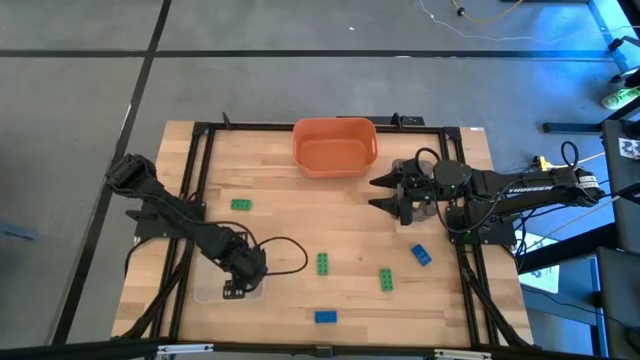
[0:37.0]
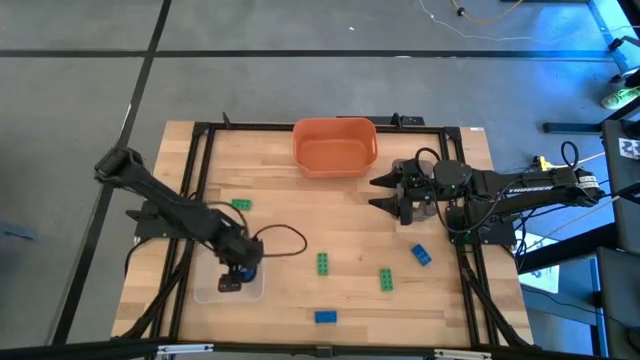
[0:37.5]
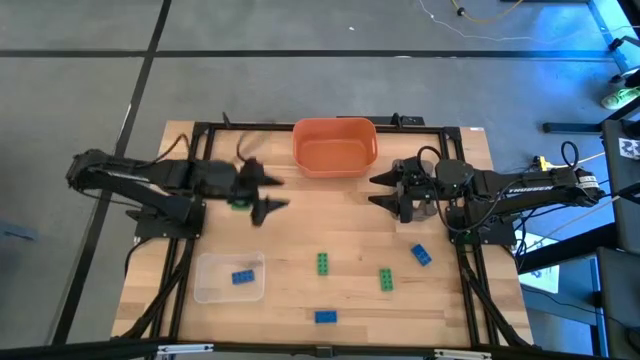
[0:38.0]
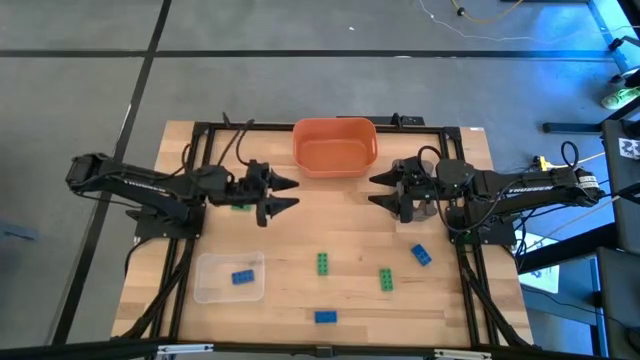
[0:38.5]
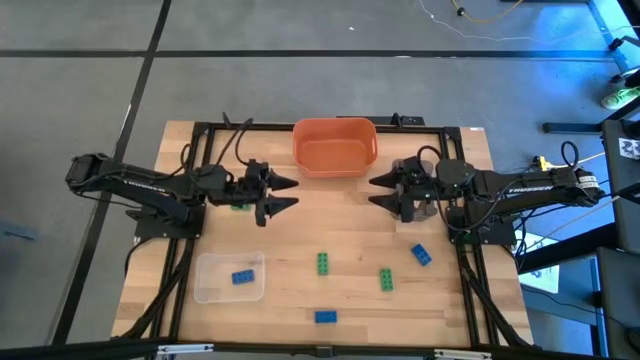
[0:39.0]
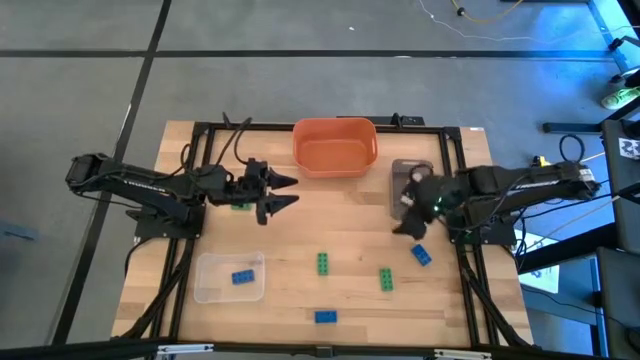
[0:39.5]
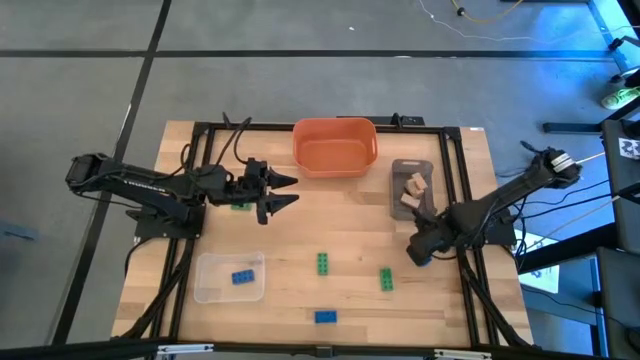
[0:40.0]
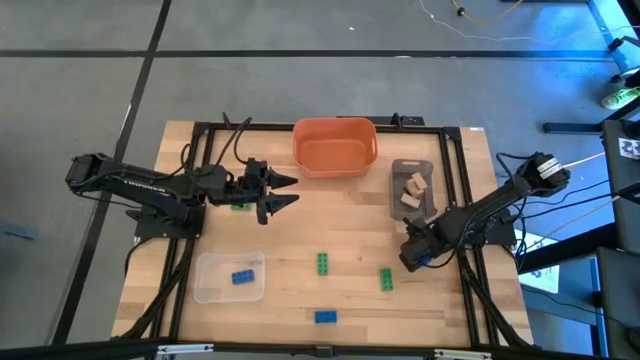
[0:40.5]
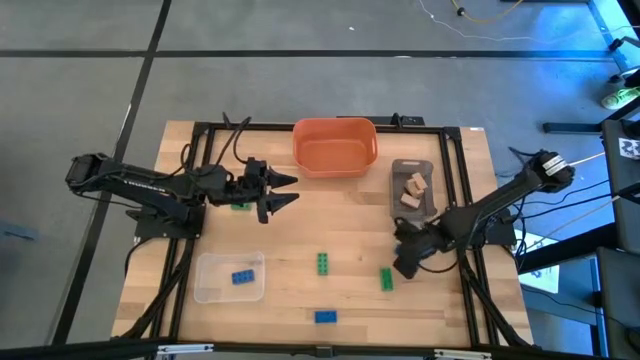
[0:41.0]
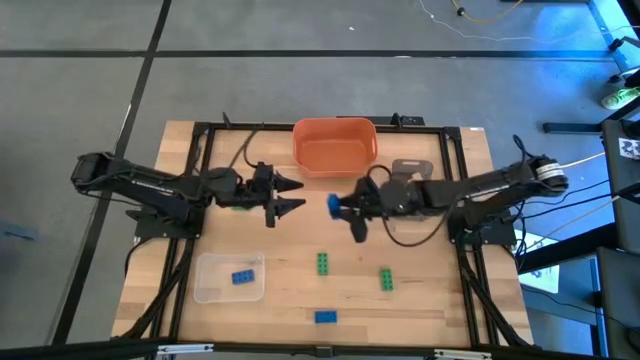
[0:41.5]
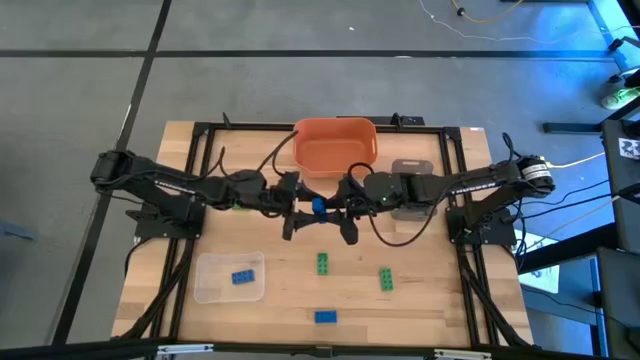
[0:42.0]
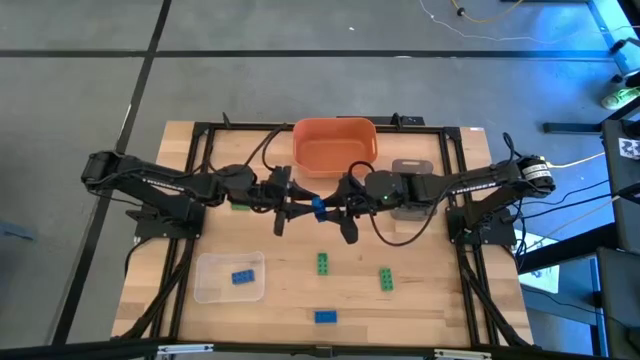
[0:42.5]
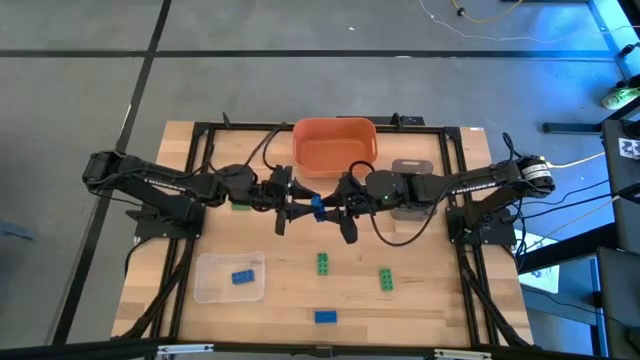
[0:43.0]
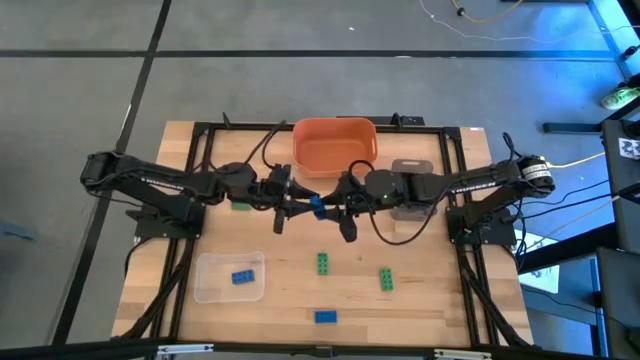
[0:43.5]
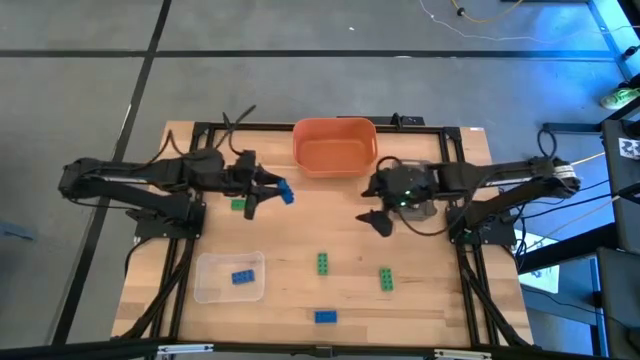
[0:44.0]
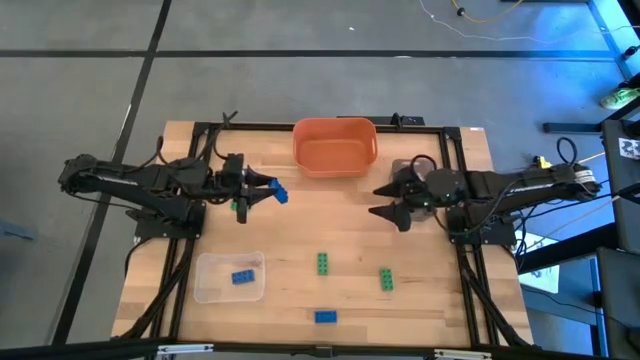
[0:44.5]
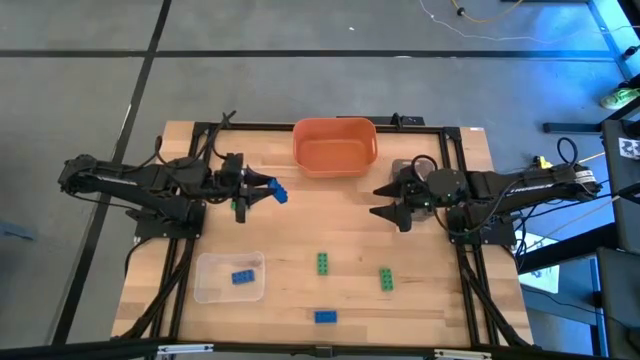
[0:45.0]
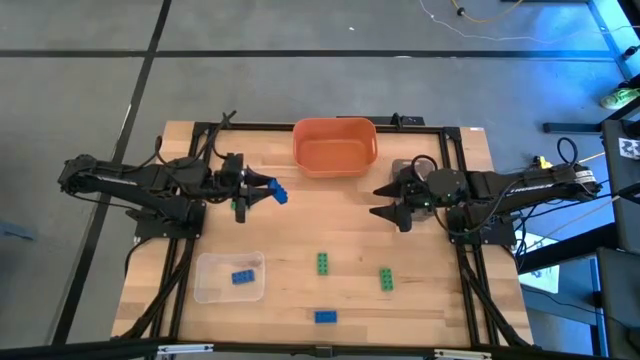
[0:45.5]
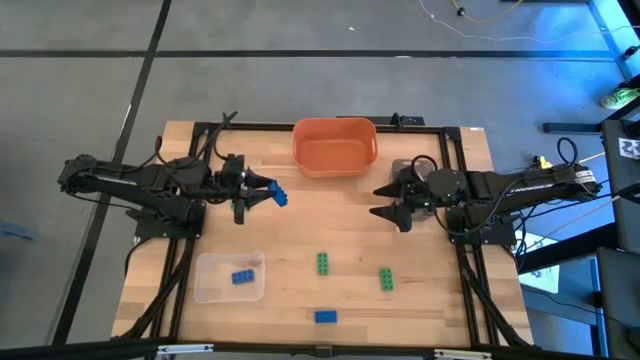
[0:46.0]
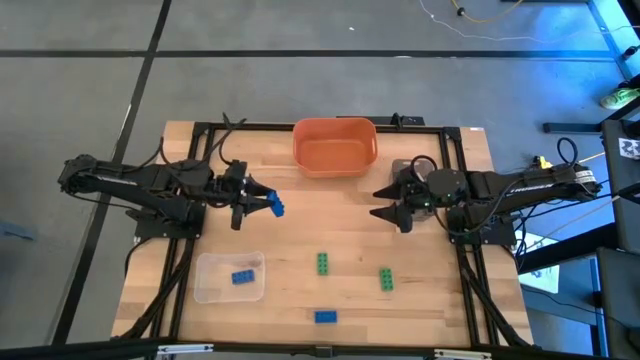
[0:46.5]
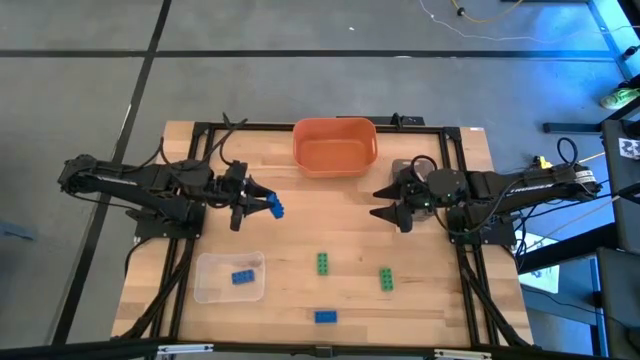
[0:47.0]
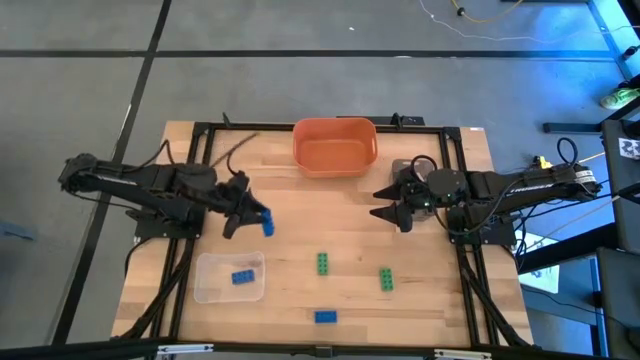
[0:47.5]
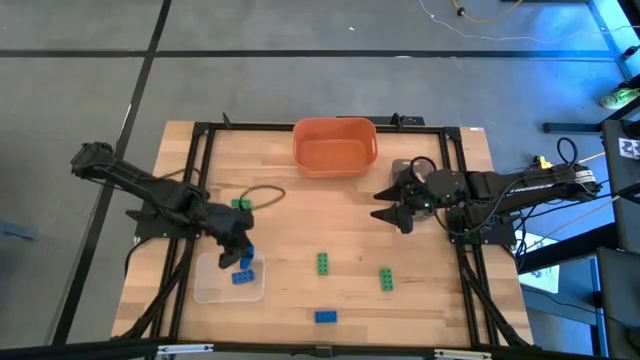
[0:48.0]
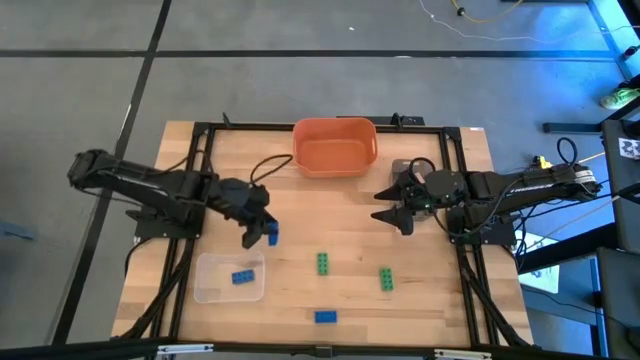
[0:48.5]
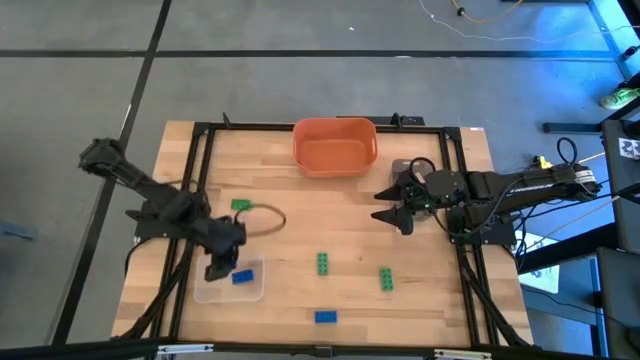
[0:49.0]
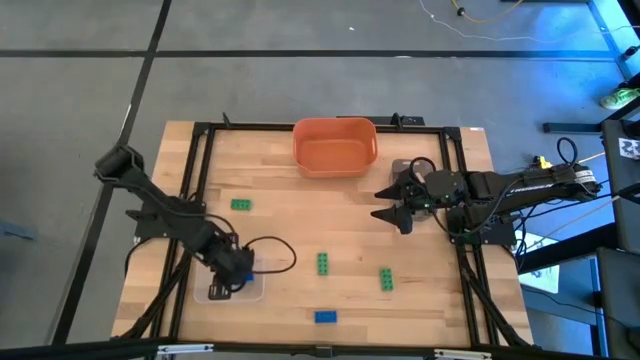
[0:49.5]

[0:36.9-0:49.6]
Task: Sort & place blocks by color
Put the blue 8 stud game piece block into the transparent bin

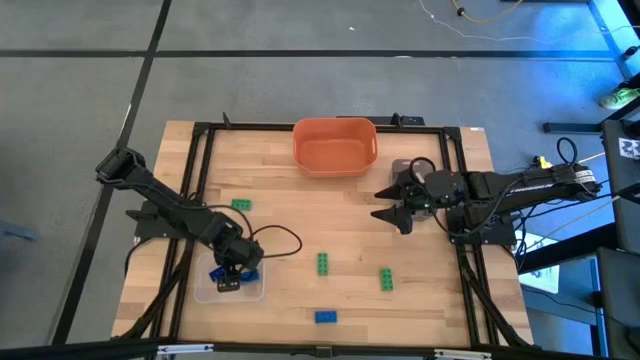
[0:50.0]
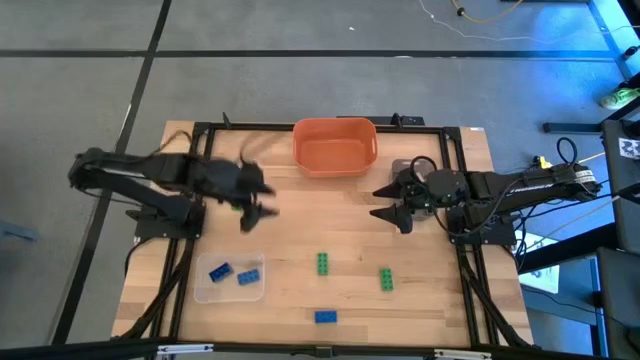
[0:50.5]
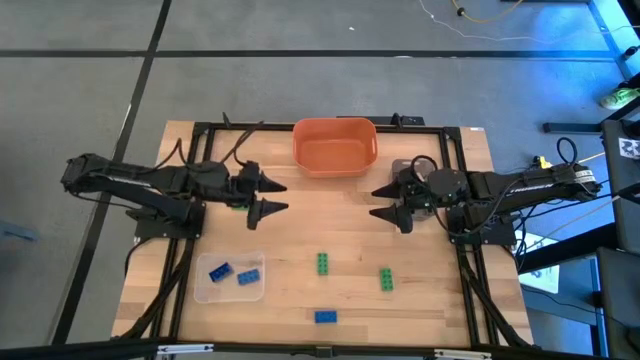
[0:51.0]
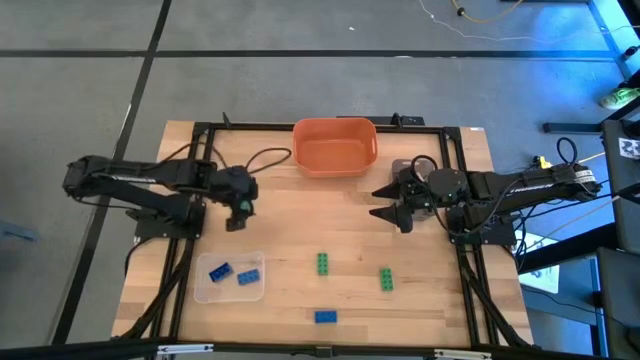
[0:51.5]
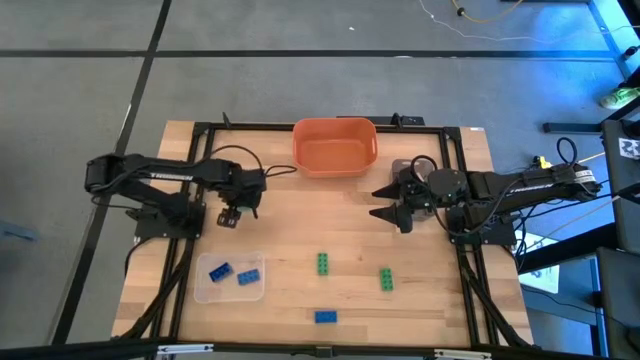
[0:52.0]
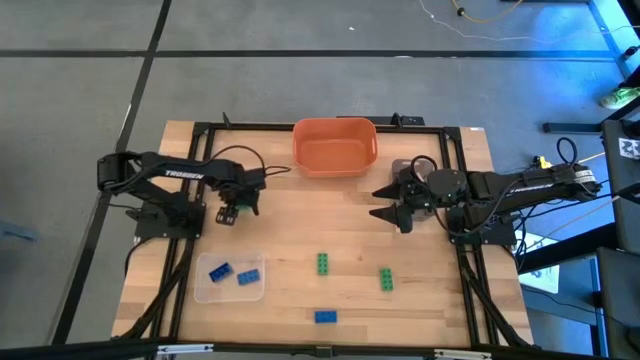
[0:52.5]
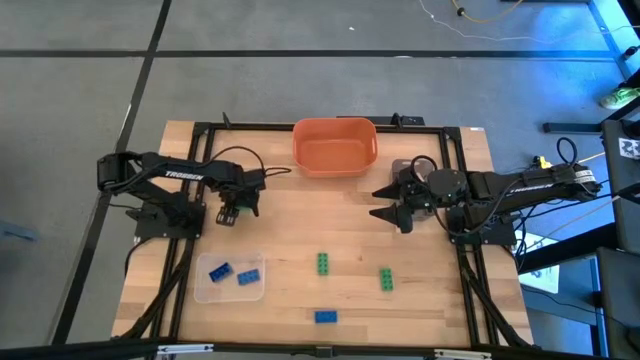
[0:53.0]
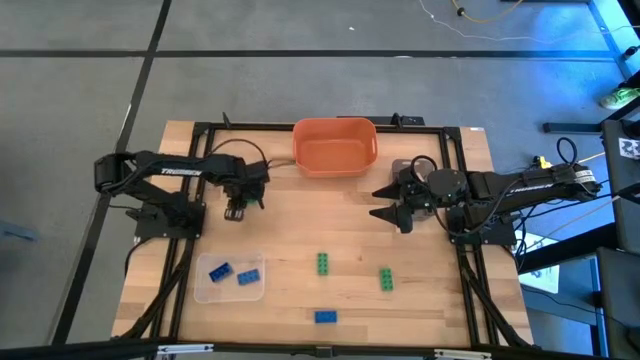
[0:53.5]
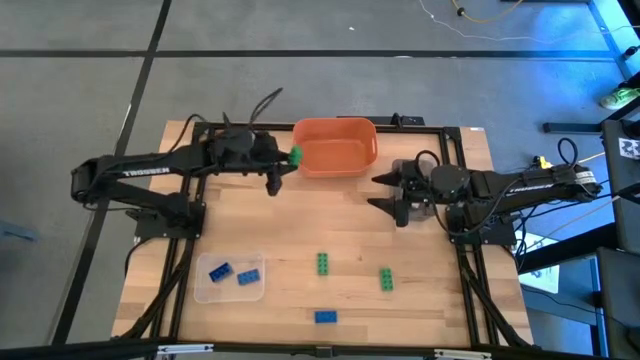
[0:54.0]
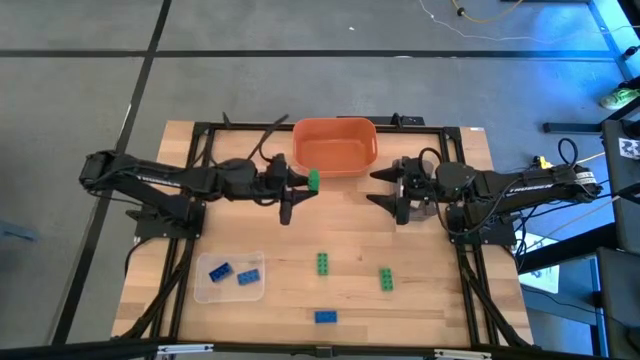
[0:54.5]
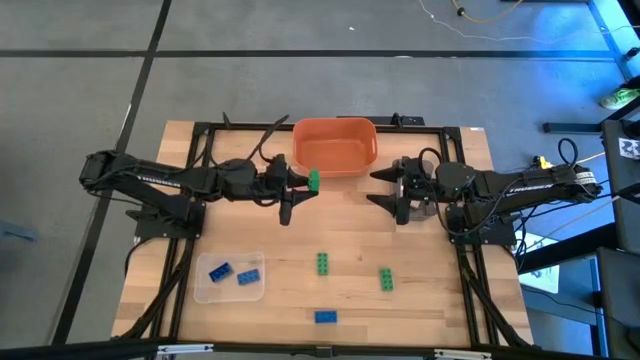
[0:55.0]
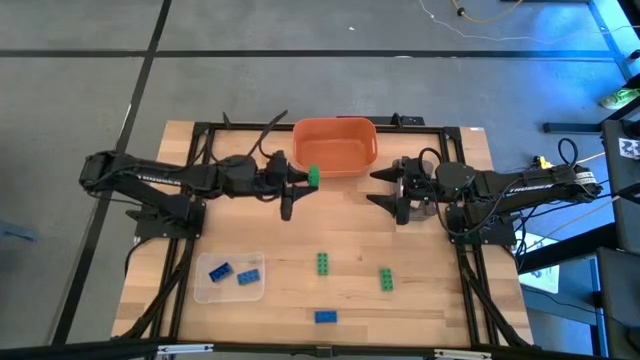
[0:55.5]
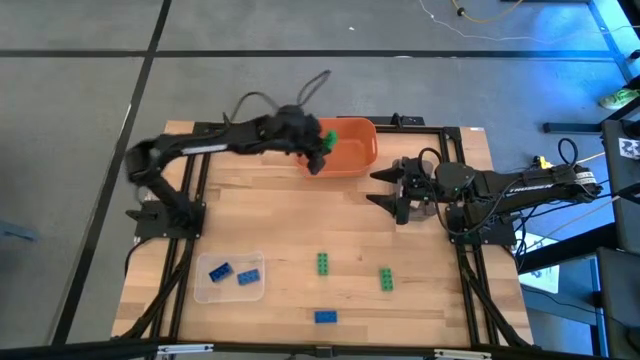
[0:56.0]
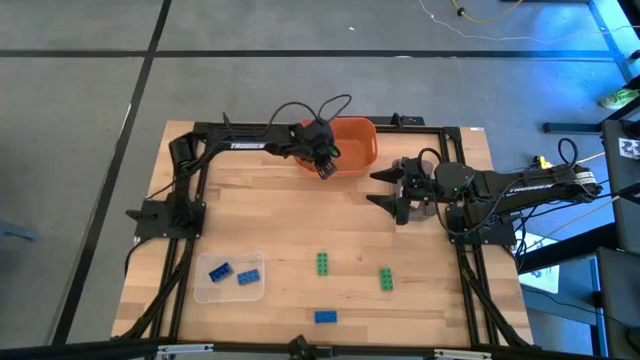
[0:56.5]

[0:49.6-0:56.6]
Put the top left green 8 stud game piece into the orange bin

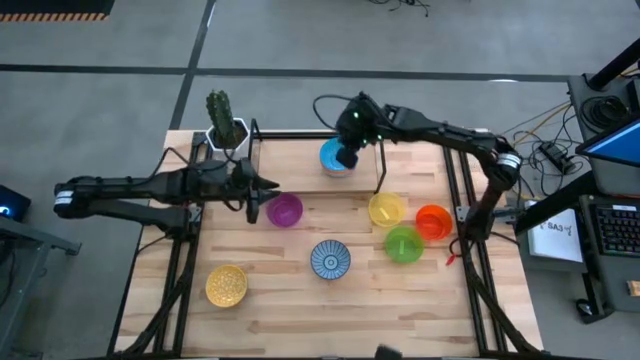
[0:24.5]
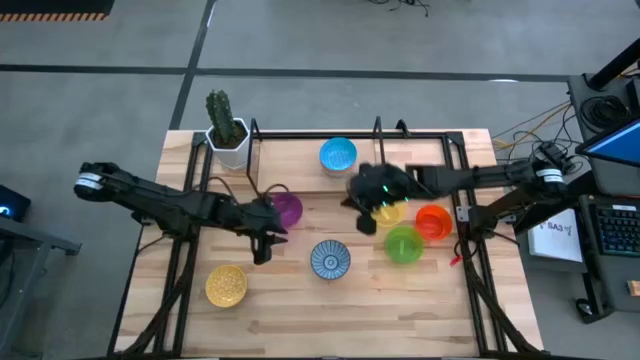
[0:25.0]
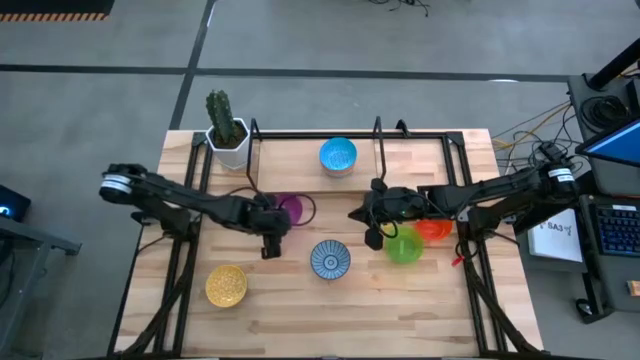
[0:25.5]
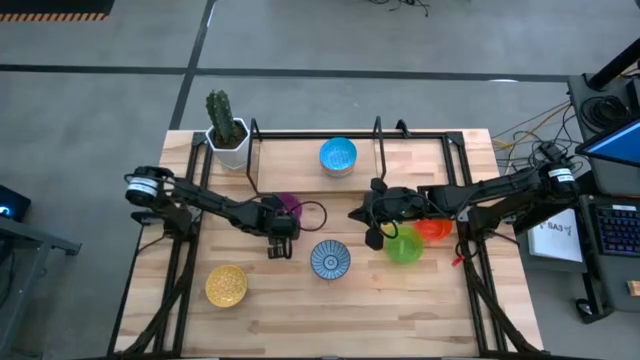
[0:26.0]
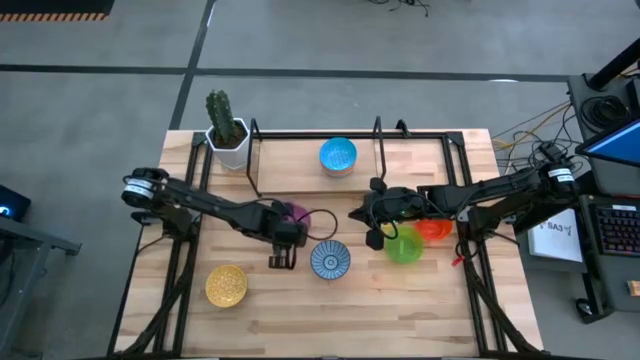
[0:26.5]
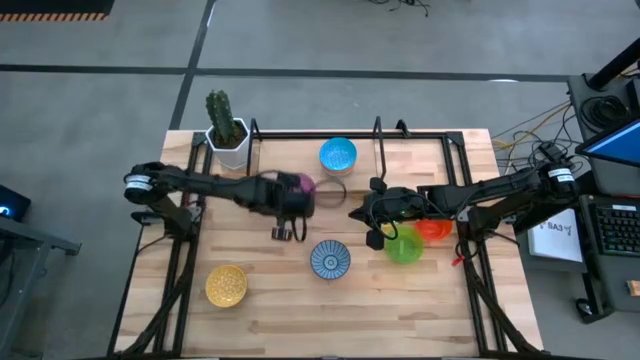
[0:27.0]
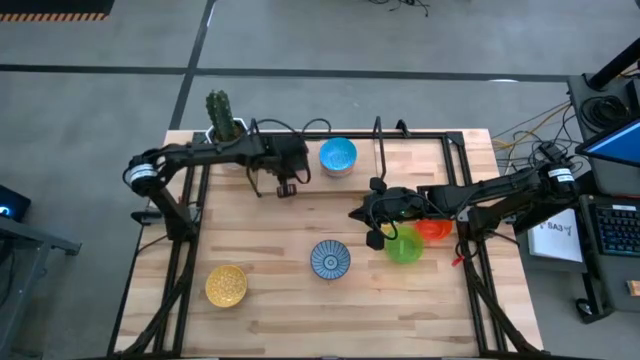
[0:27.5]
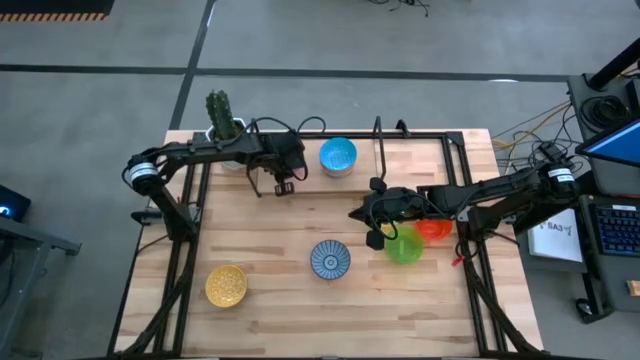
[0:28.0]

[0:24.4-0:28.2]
Task: Place and stack bowls onto a shelf
Put the violet bowl on the shelf
